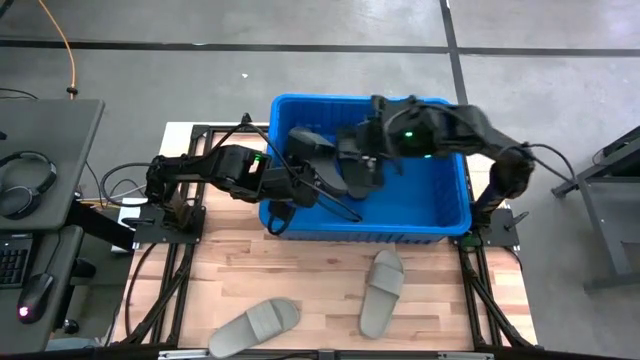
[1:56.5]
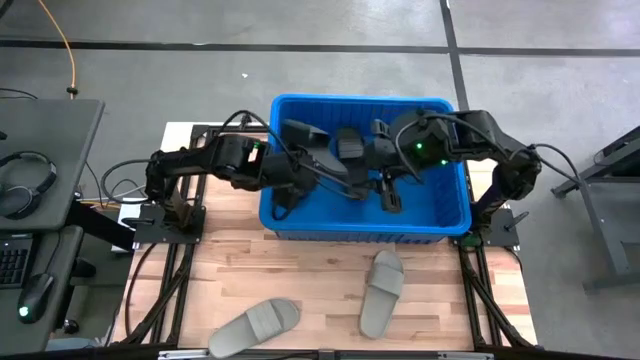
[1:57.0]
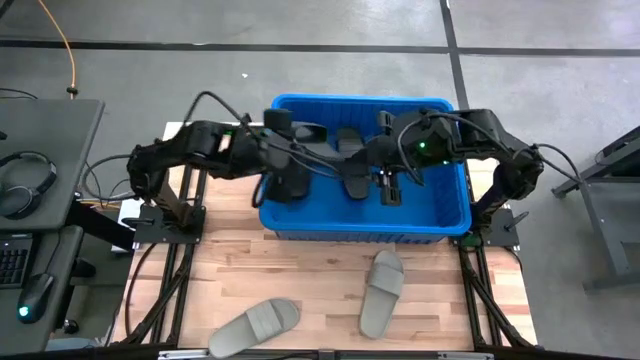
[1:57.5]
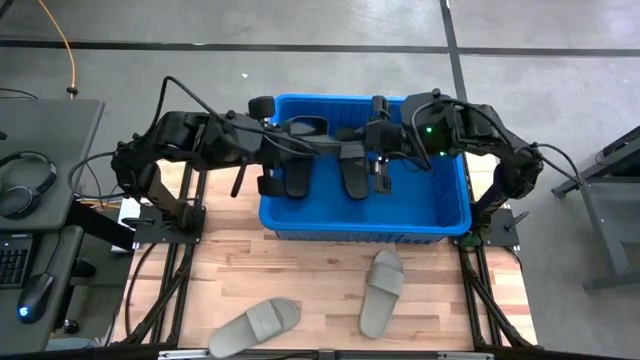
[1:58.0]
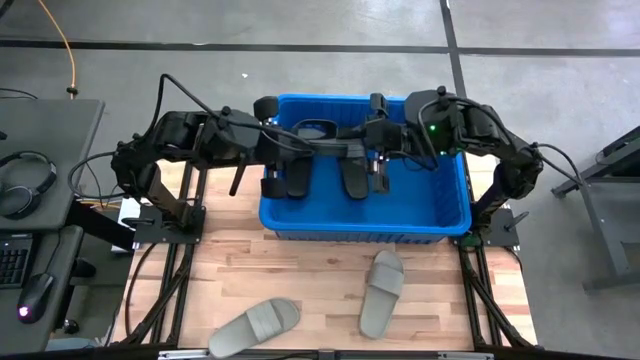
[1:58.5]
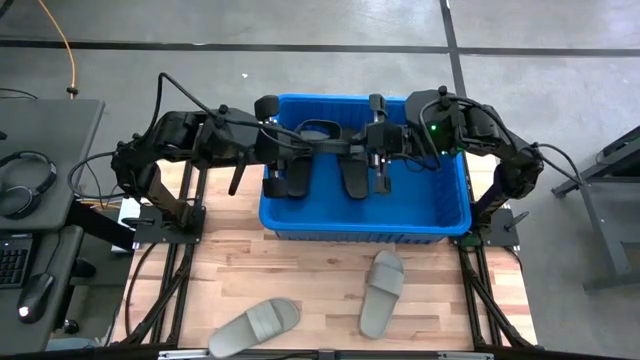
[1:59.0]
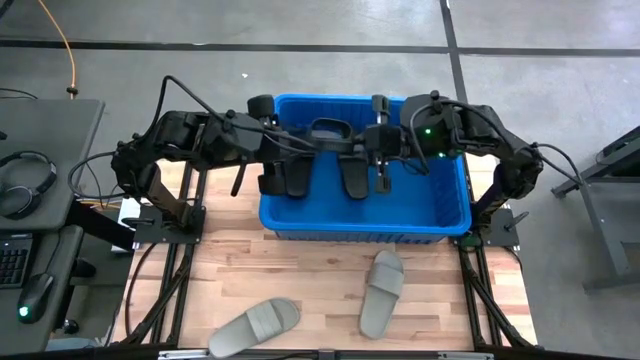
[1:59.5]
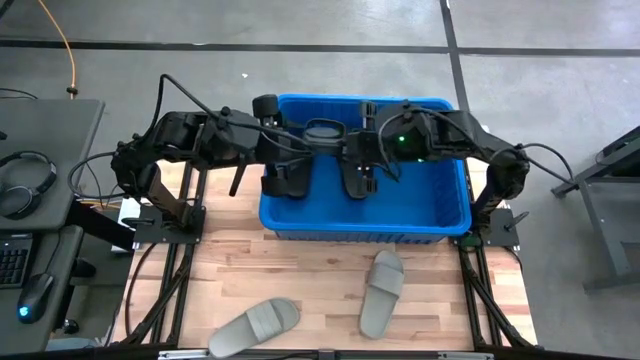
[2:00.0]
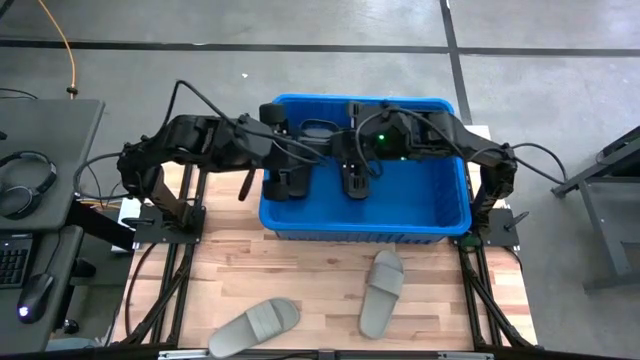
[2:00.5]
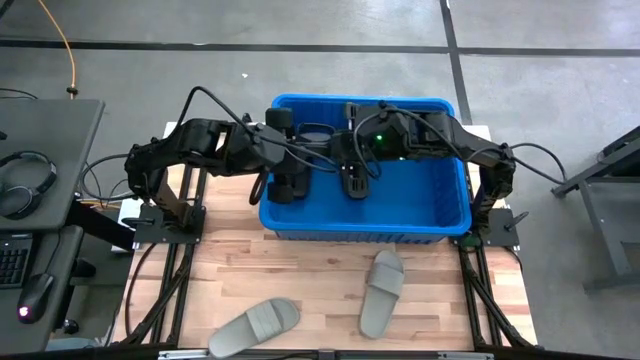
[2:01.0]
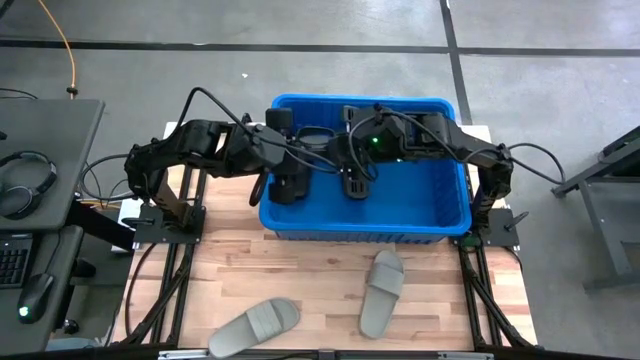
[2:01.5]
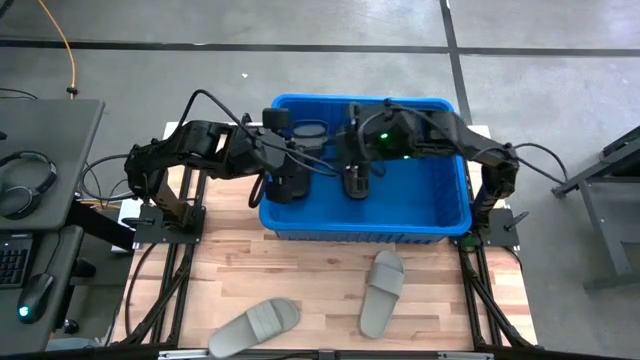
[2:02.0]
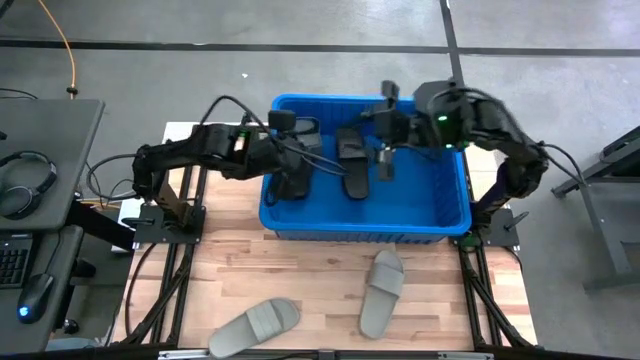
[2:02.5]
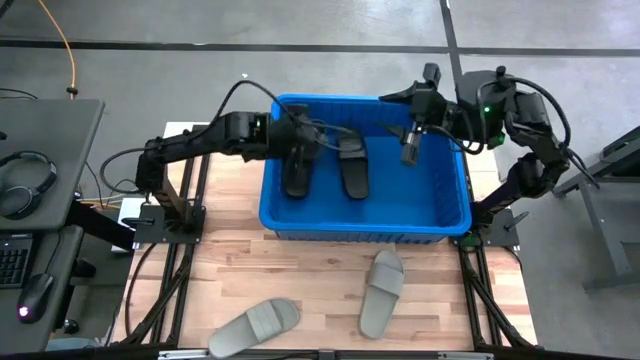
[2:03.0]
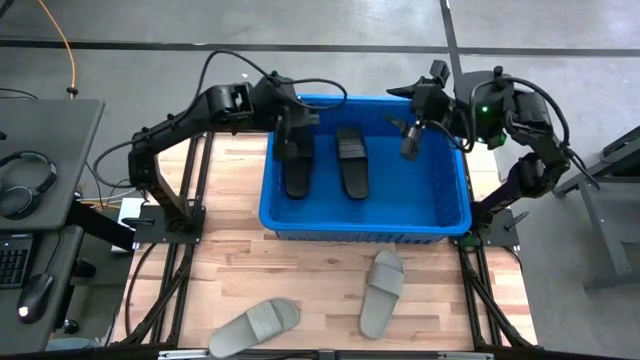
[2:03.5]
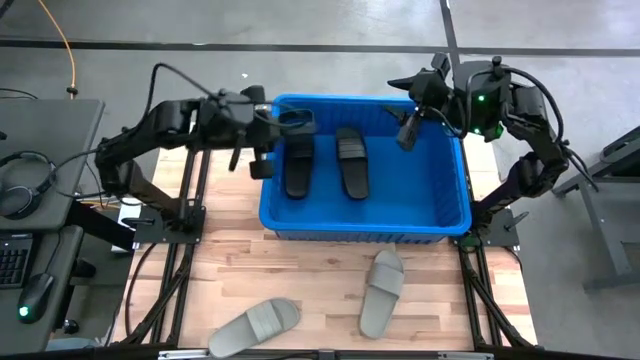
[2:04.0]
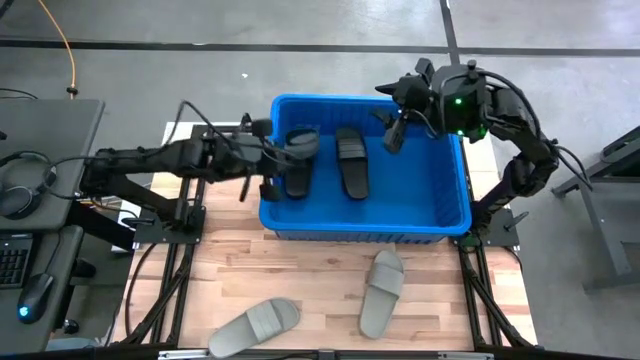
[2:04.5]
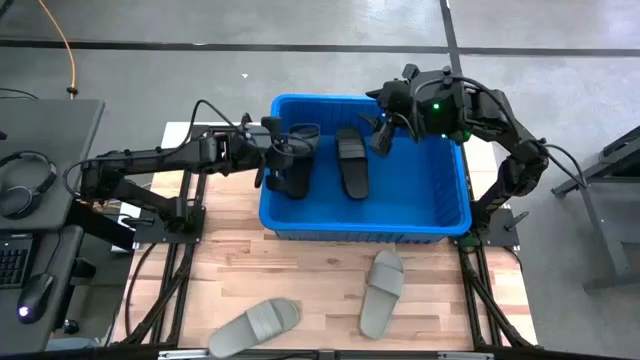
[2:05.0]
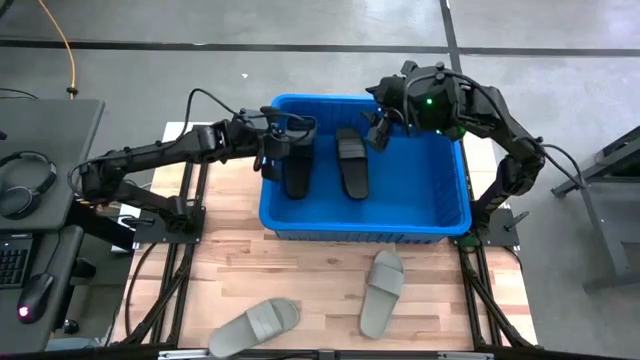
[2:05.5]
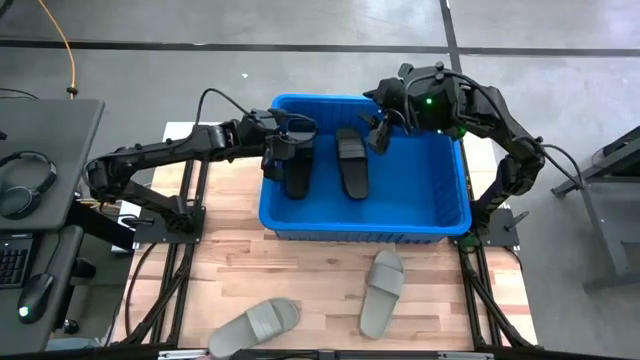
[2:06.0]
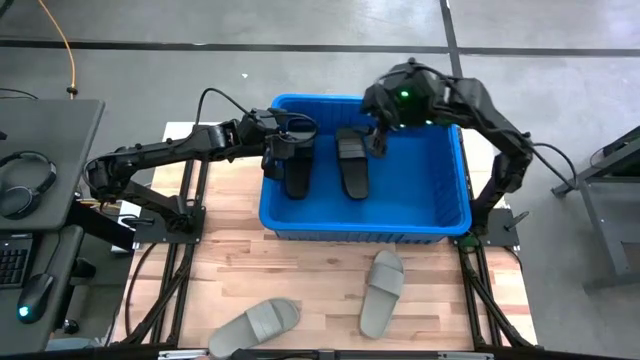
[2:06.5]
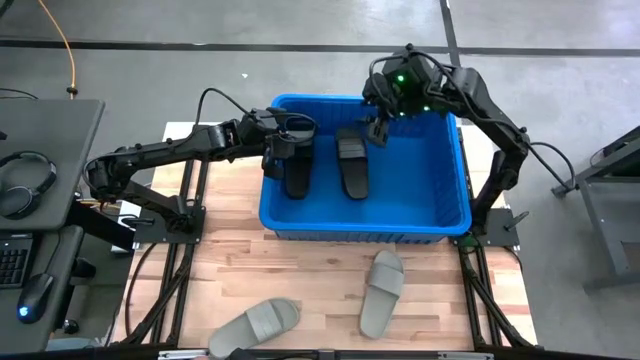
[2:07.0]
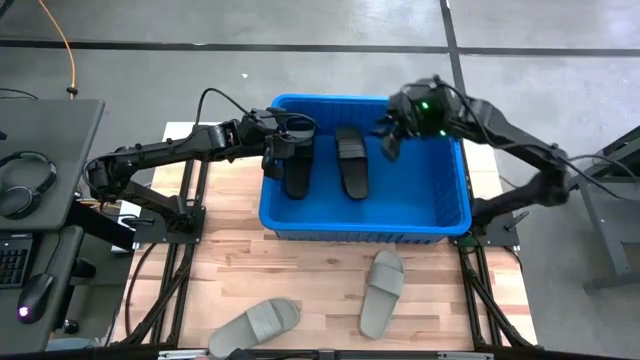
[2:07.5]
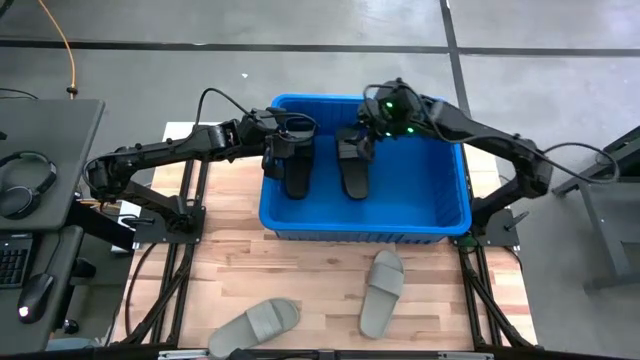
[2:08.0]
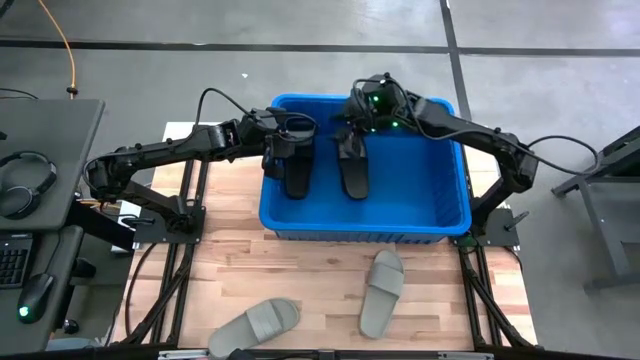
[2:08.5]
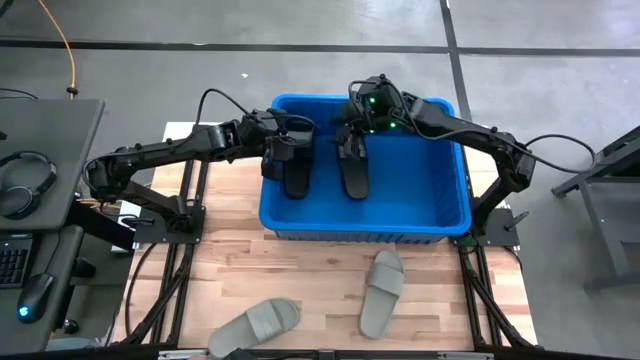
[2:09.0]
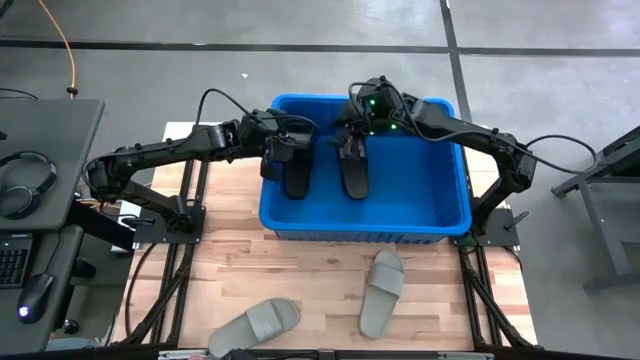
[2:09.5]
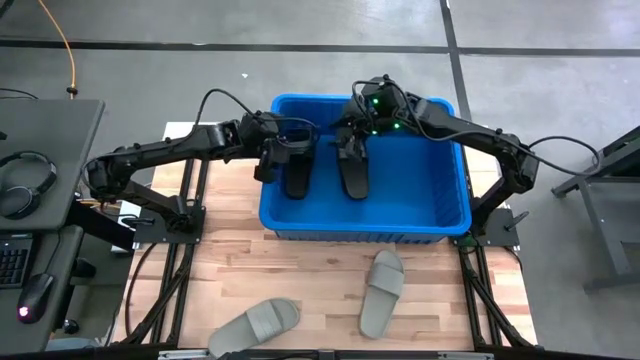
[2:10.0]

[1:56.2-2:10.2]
Task: Pick and place slides into bin
Put the black slides on top of the black slides into the blue bin

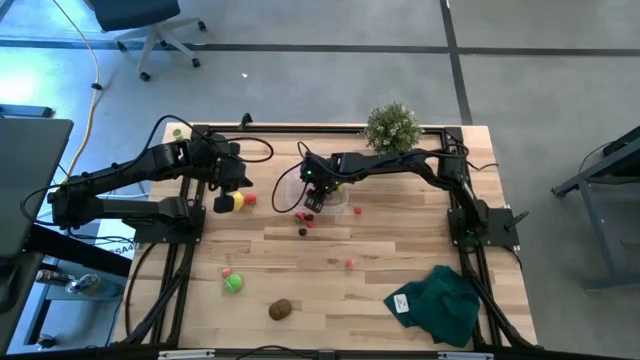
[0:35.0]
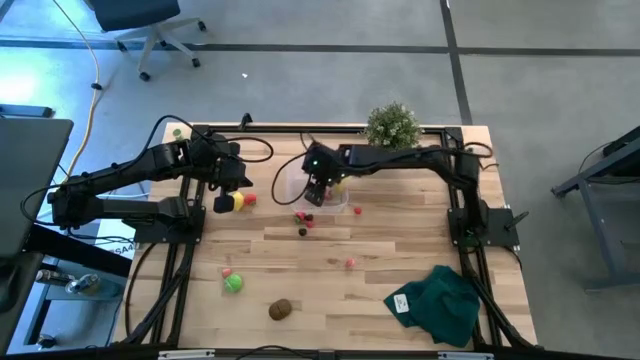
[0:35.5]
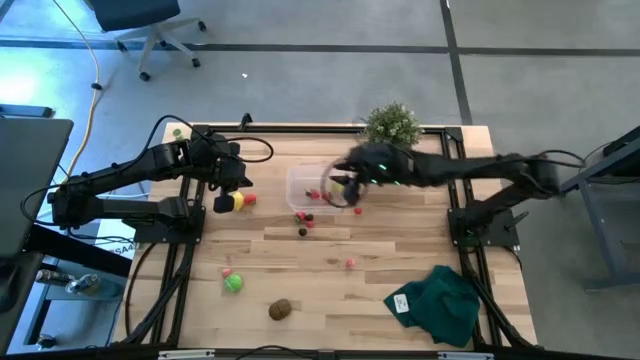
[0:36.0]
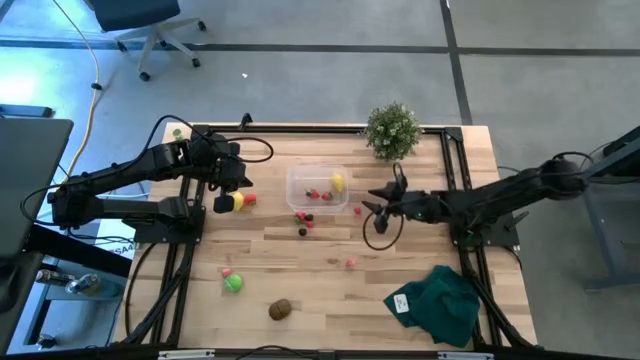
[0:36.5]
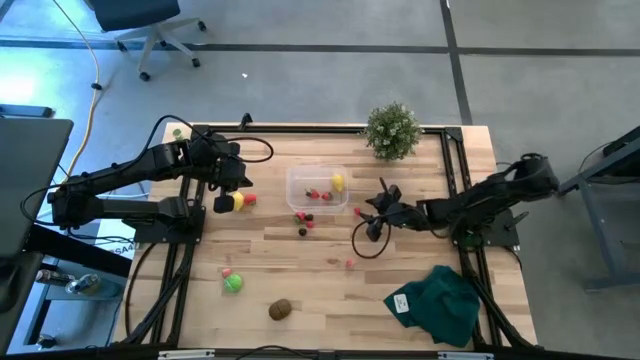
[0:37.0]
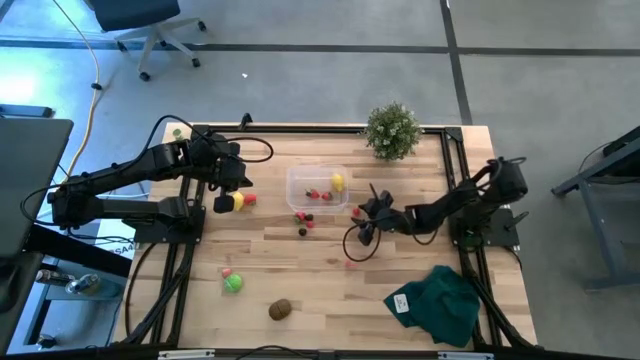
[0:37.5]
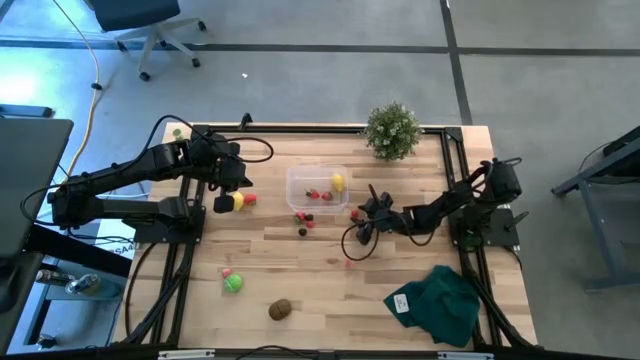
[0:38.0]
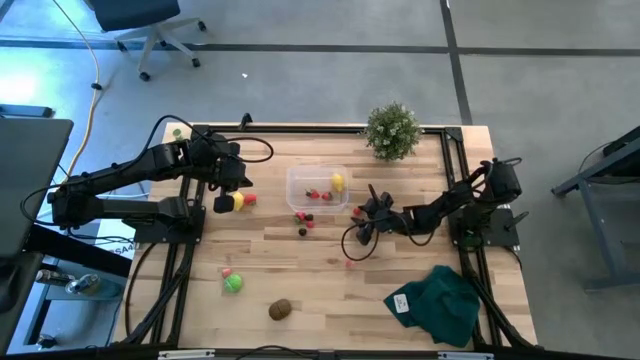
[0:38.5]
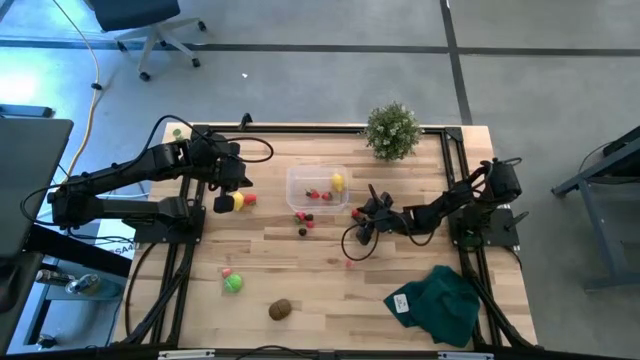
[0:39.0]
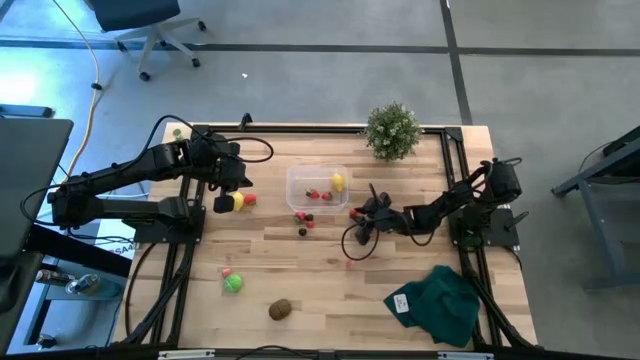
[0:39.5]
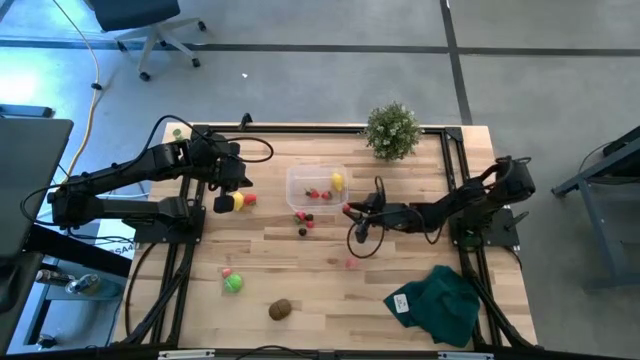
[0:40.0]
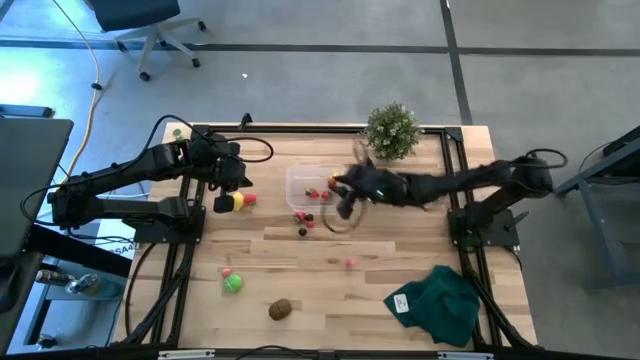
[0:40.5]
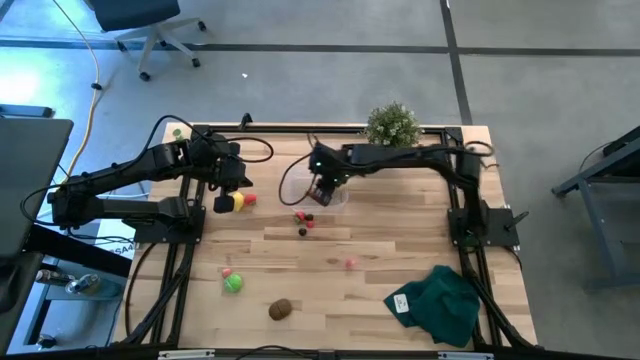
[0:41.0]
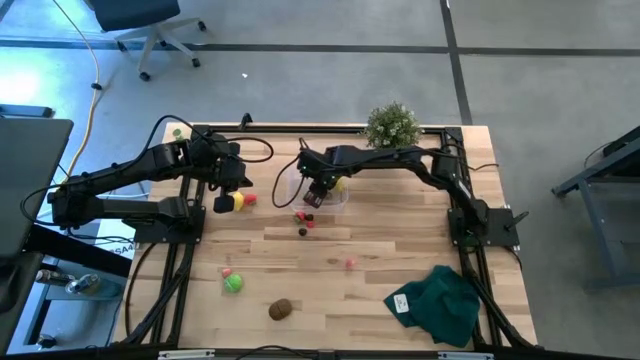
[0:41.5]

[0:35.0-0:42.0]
Task: Pick and placing Produce into tupperware
Put the red cherry into the transparent bin
